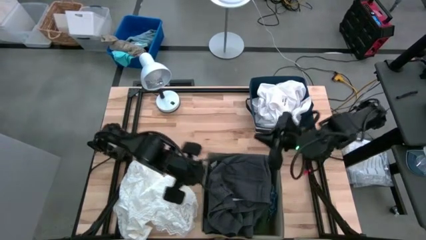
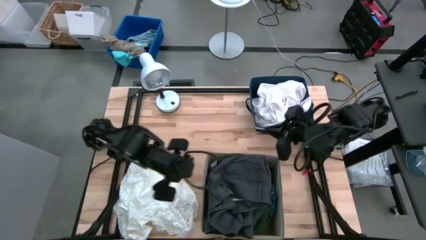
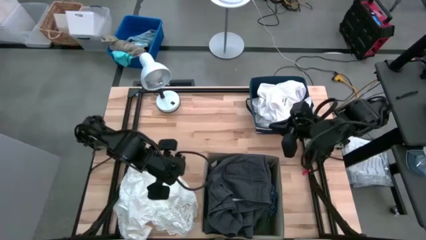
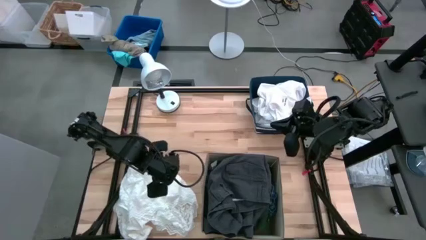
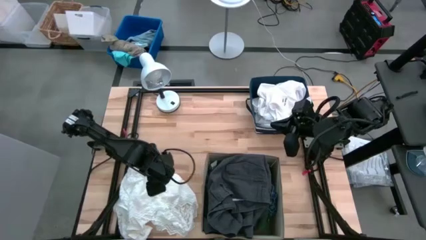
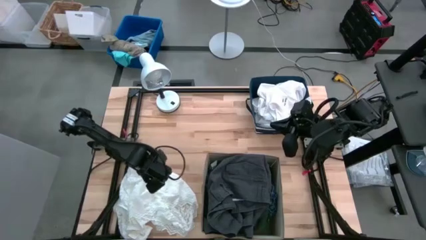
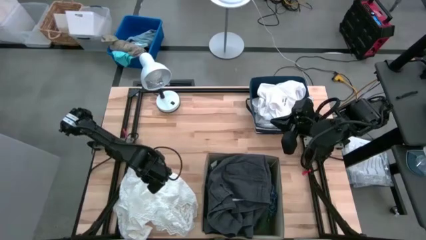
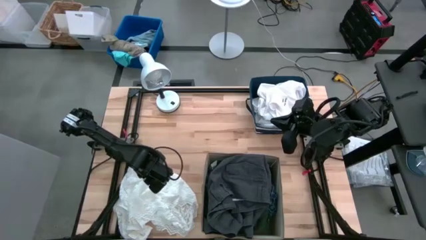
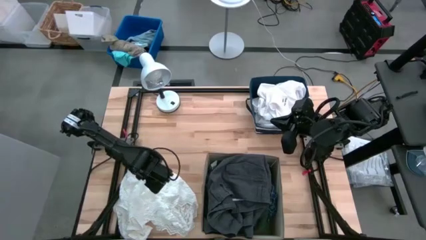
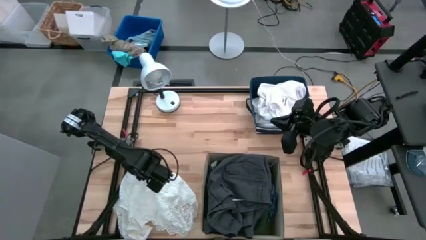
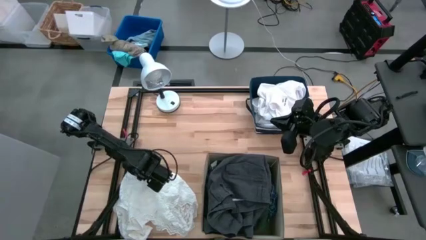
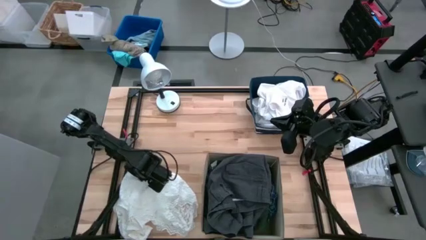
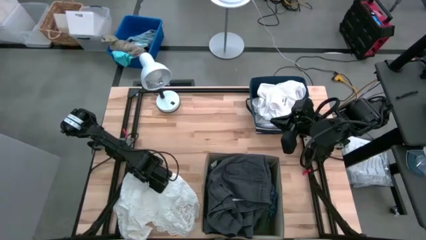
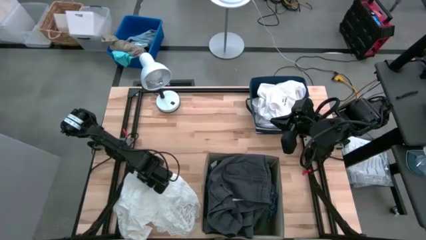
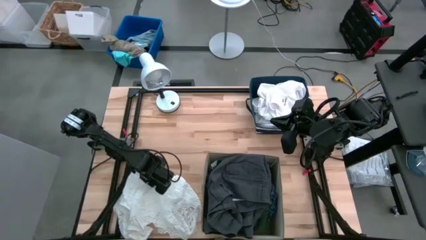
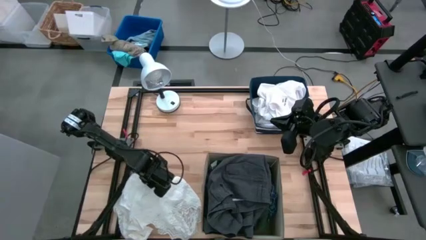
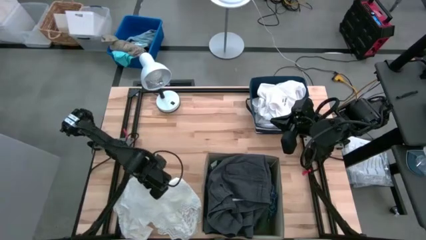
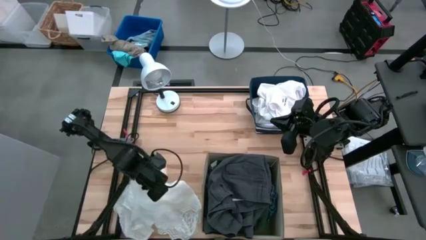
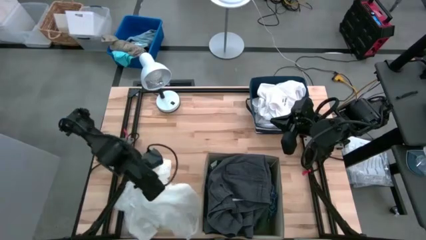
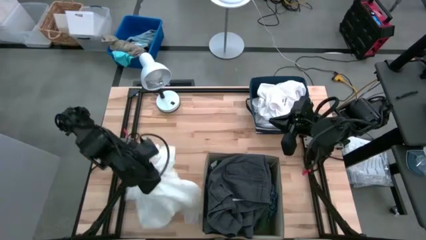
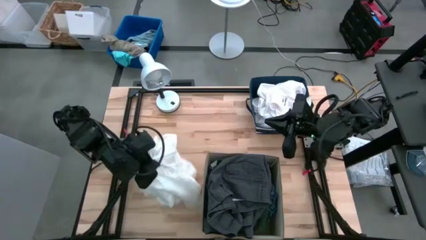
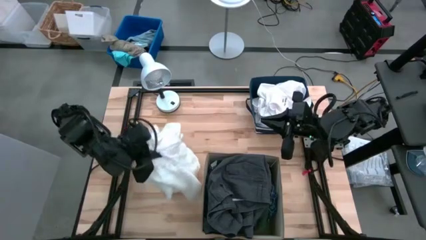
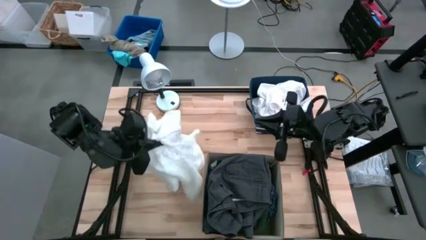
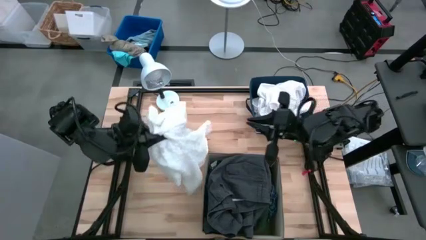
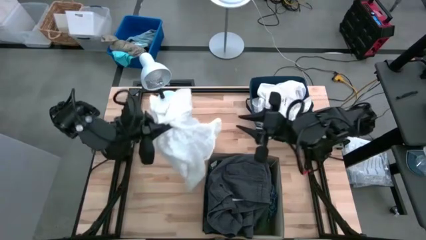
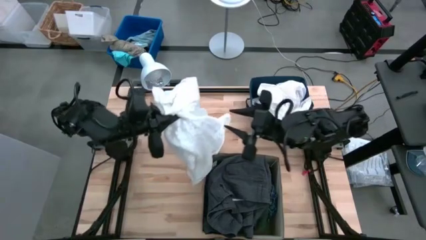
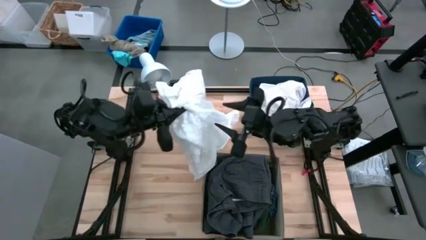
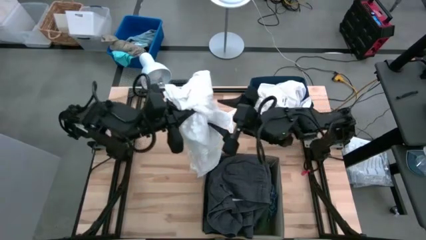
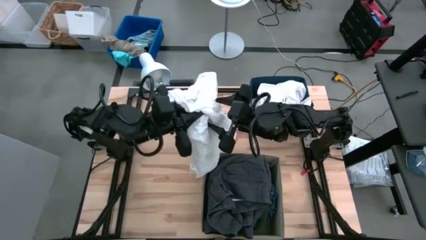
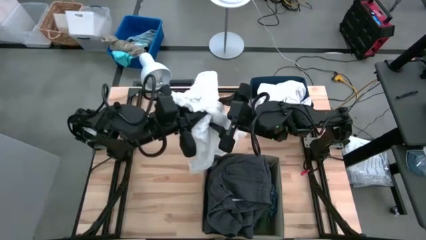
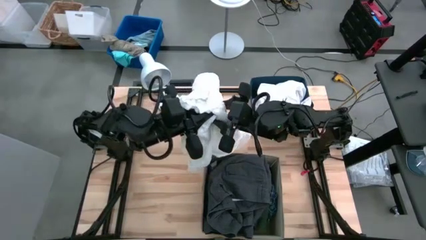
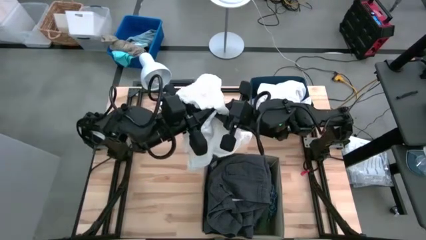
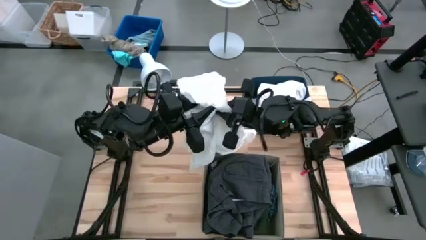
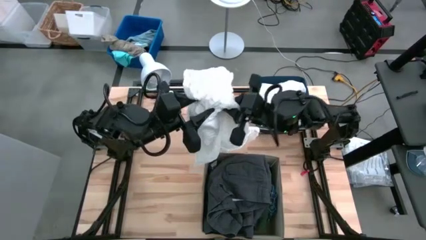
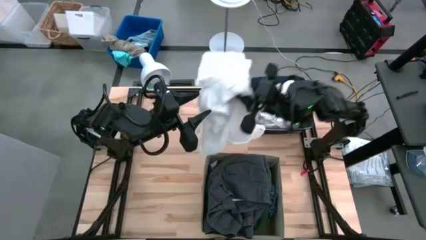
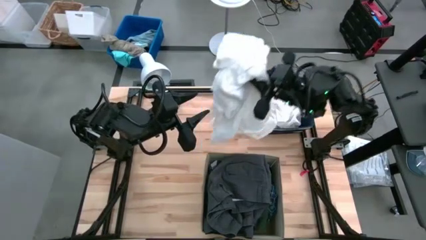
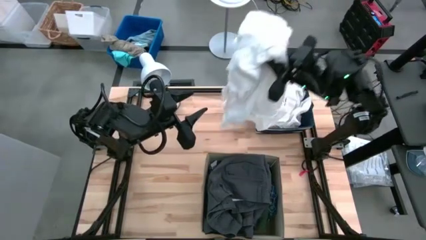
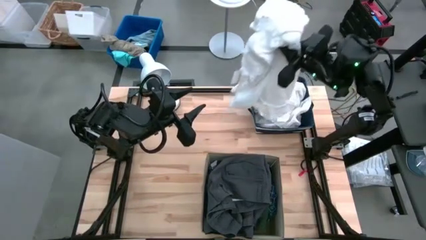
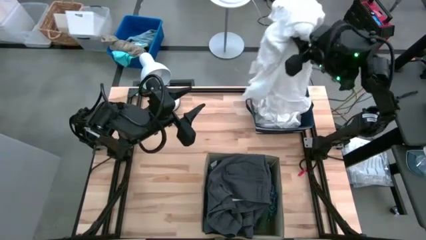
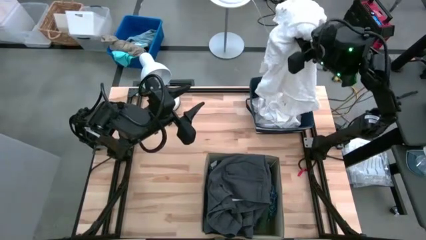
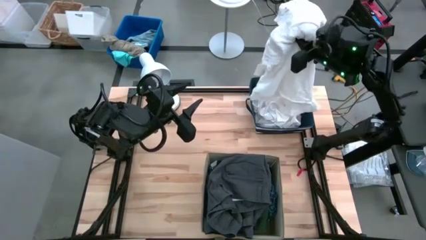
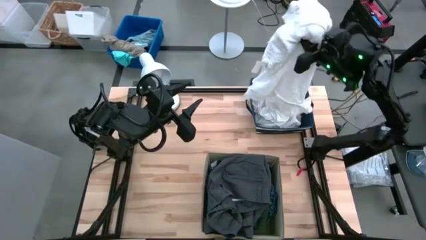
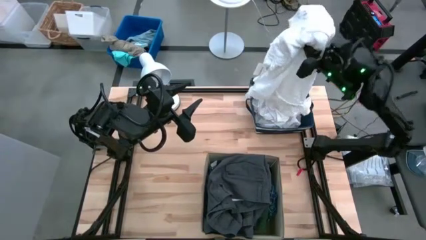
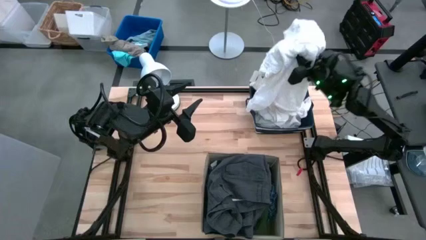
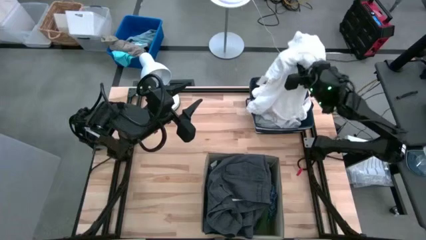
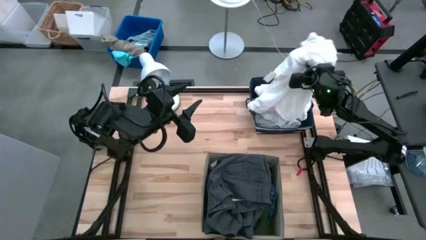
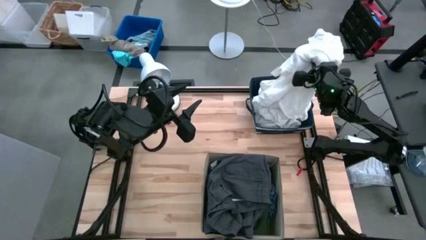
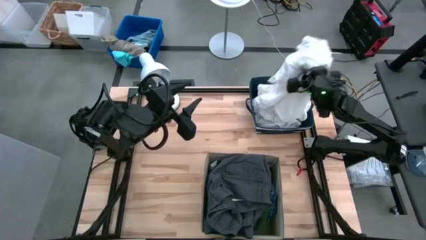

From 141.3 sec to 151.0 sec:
Task: Sort clothes
Put the white blouse into the blue laundry organizer

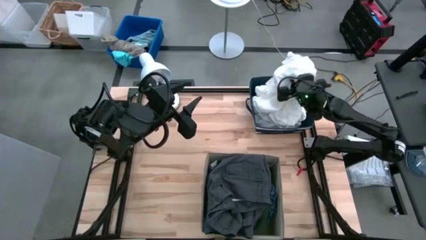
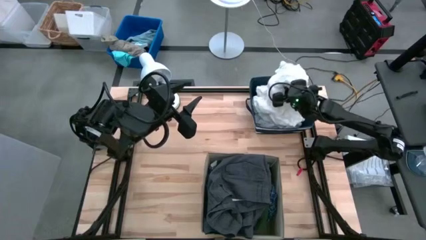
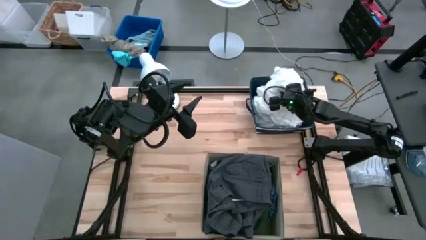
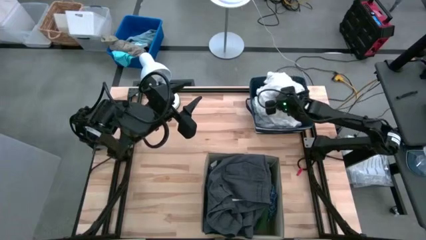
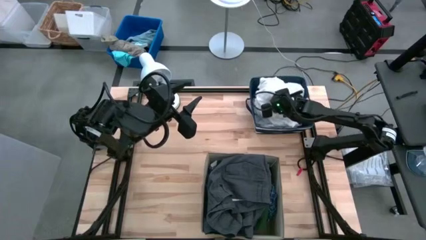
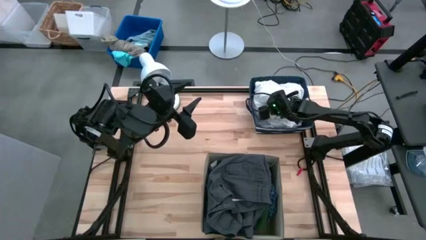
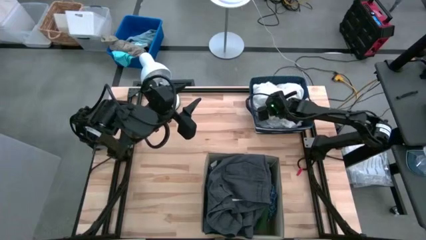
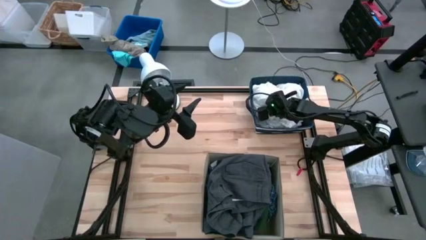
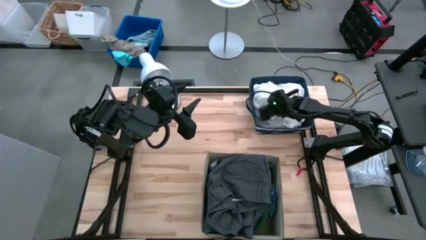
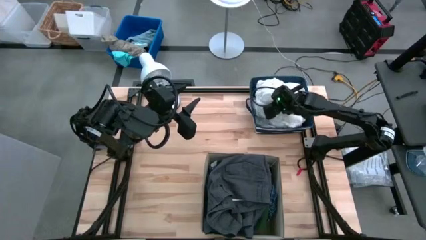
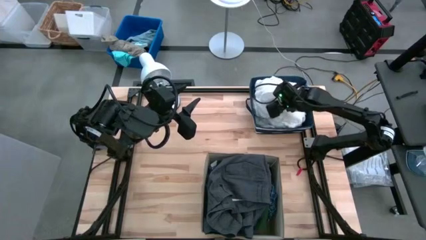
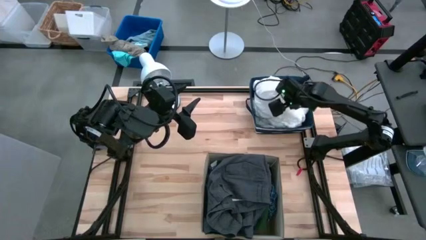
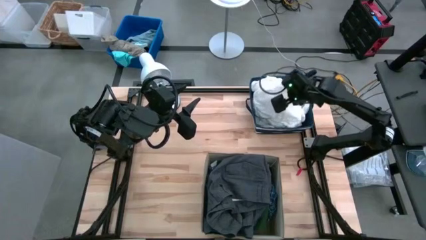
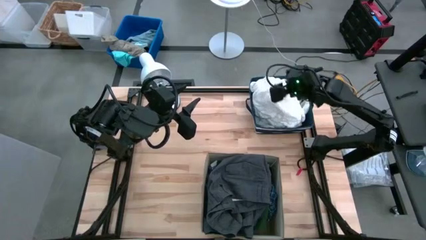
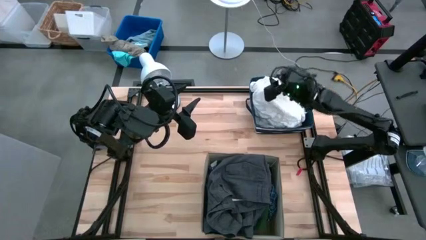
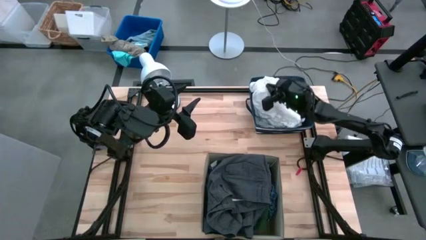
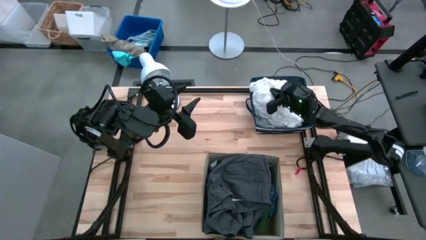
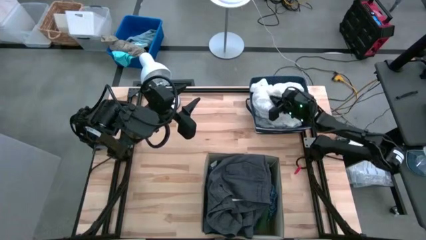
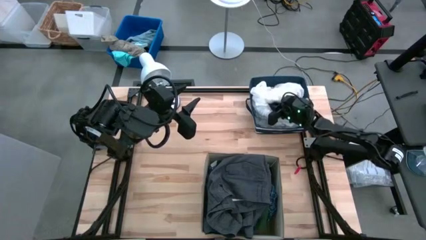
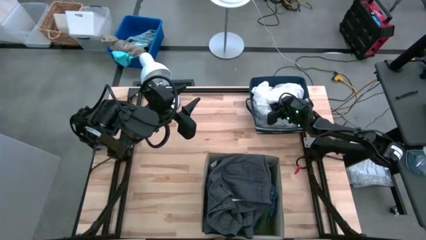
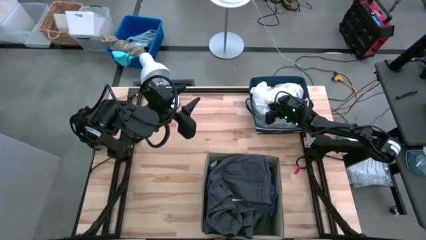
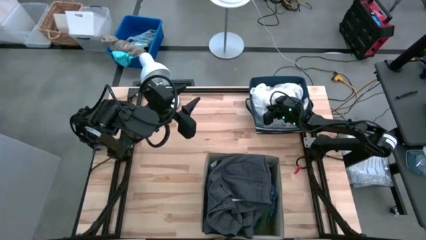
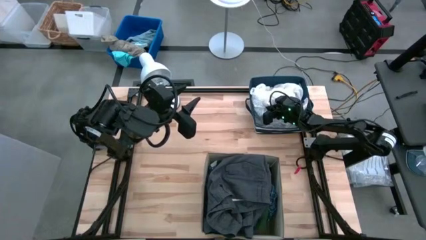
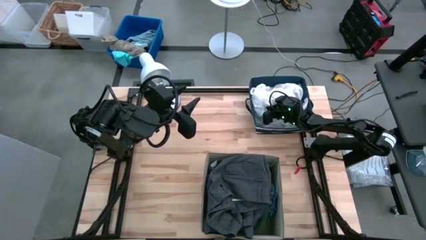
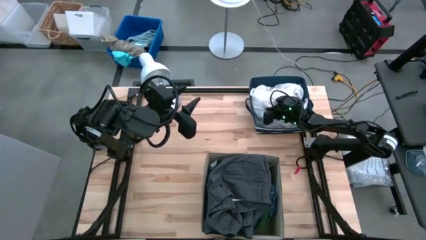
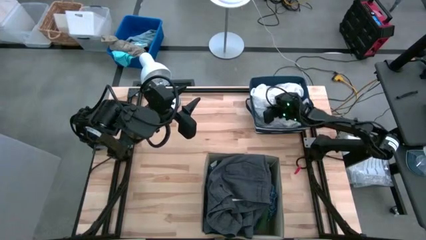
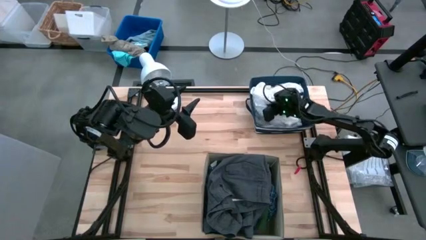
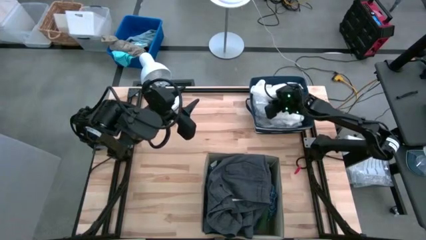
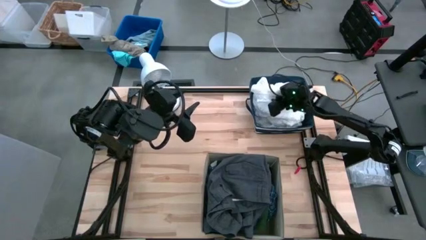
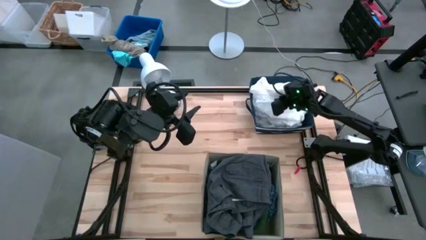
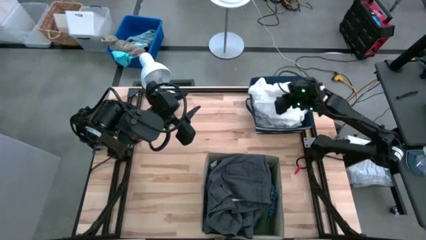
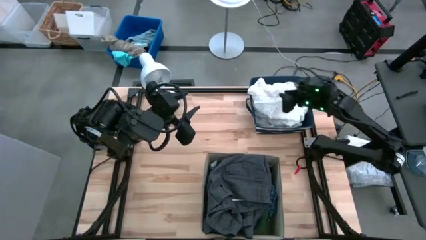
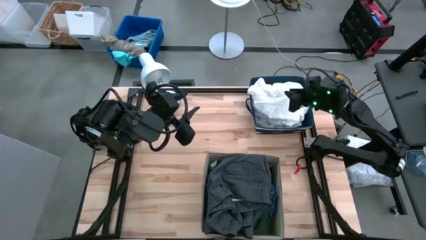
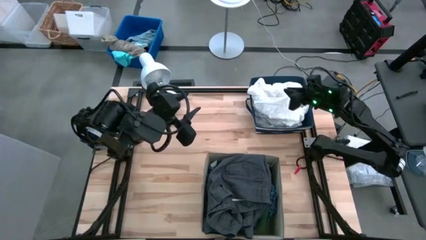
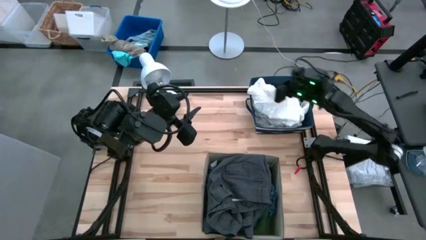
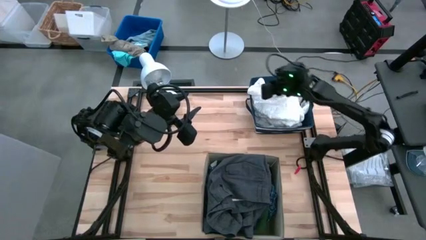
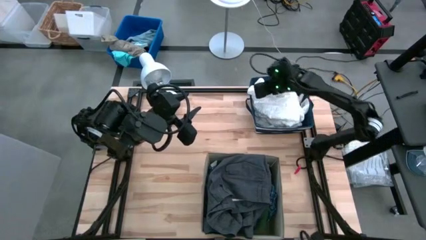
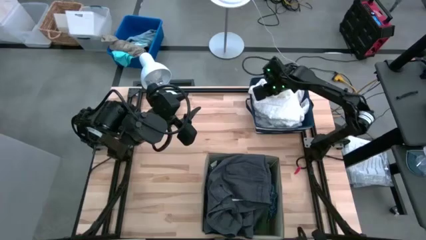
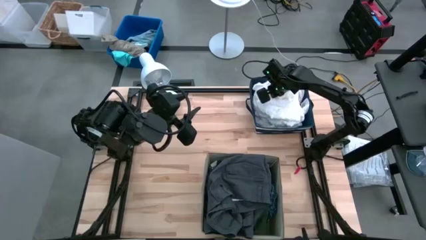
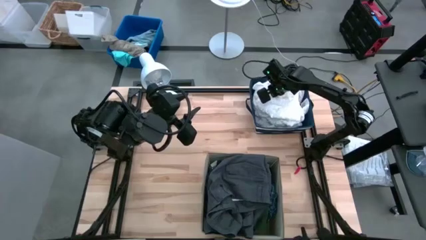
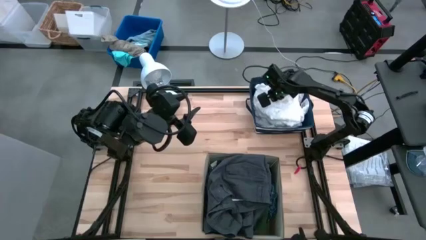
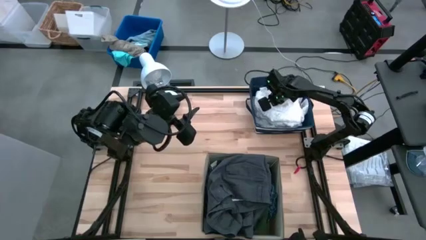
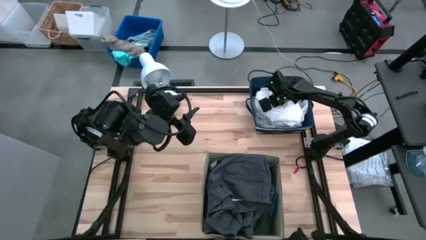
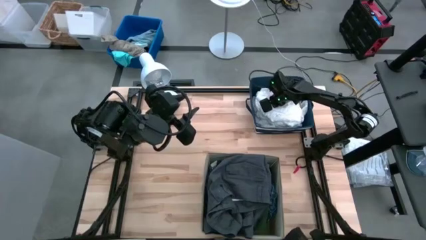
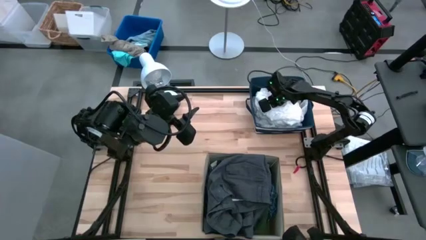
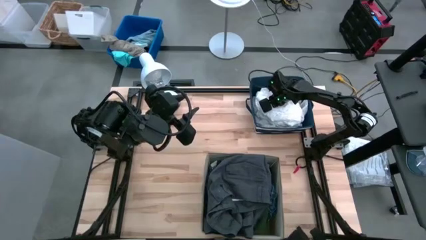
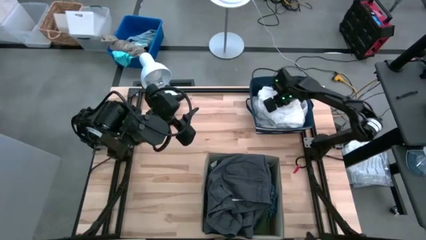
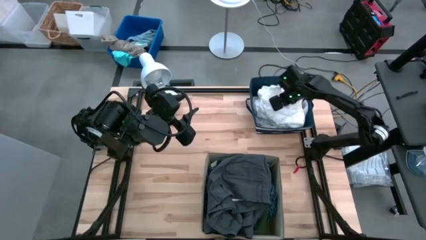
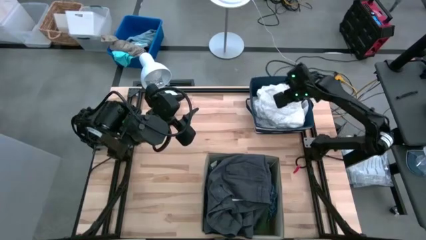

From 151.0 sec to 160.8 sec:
Put the white blouse into the blue laundry organizer
